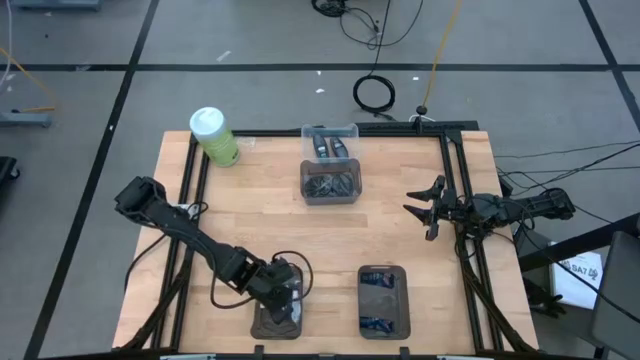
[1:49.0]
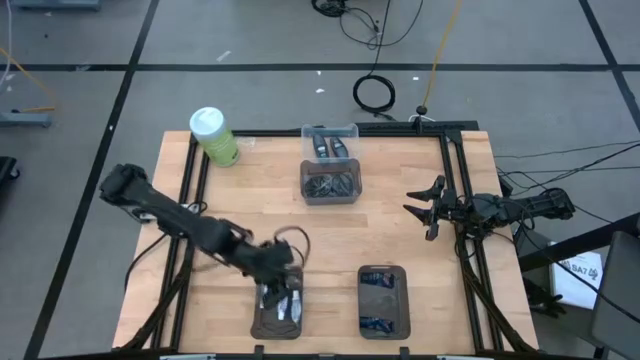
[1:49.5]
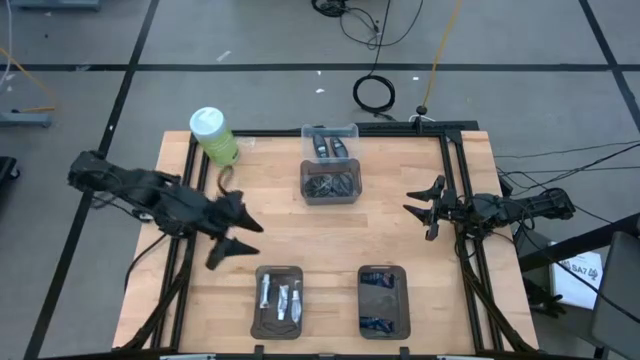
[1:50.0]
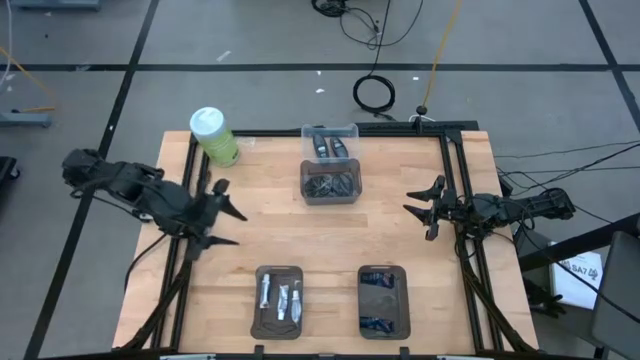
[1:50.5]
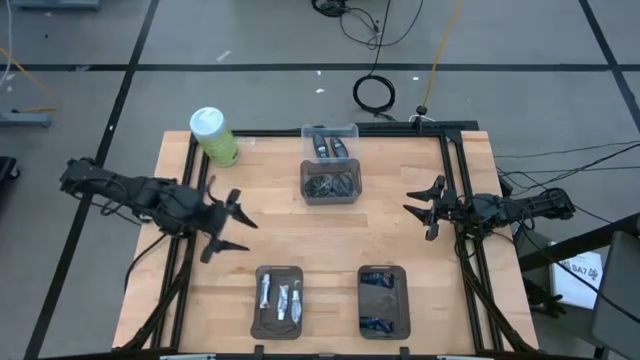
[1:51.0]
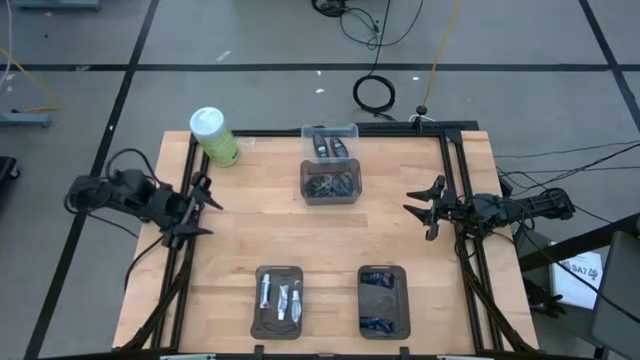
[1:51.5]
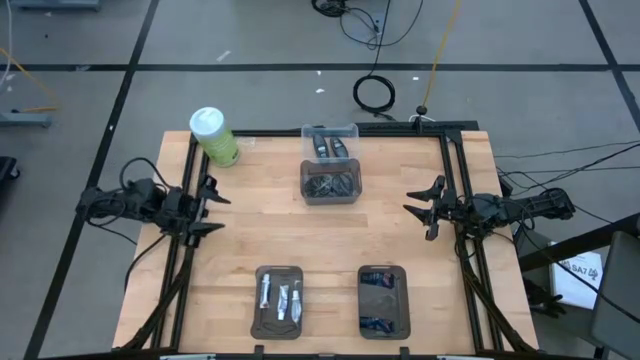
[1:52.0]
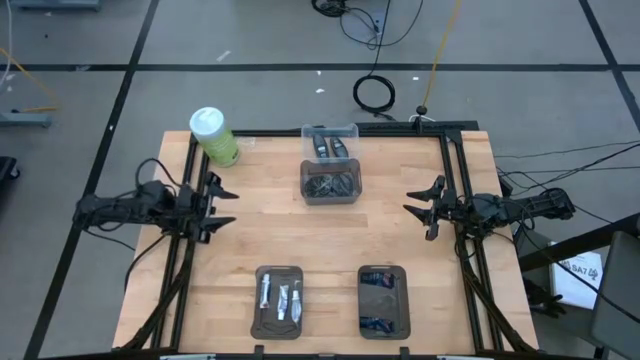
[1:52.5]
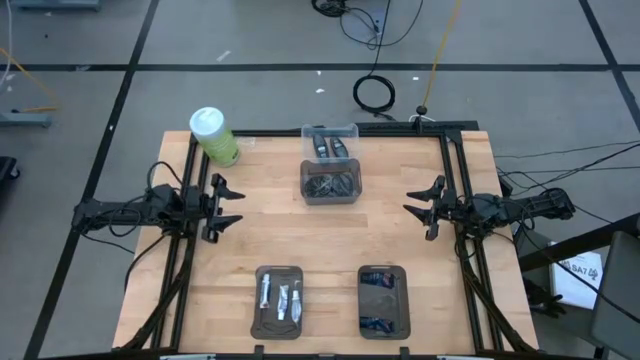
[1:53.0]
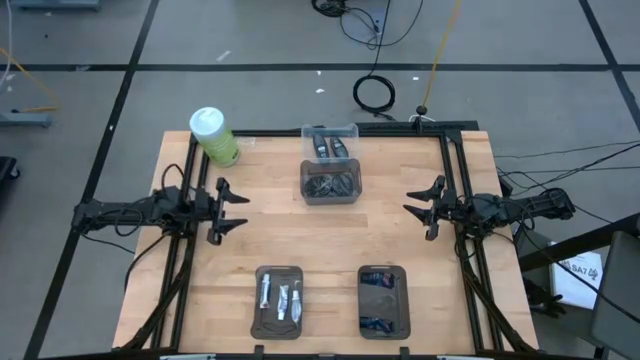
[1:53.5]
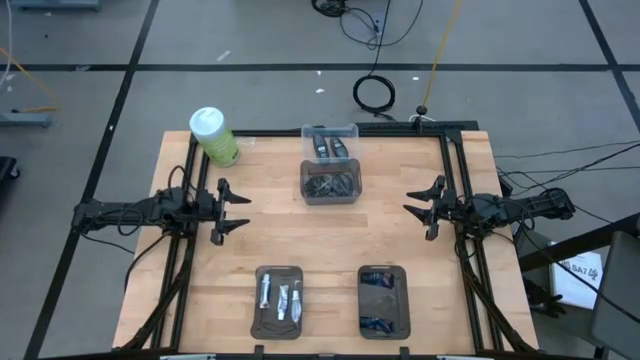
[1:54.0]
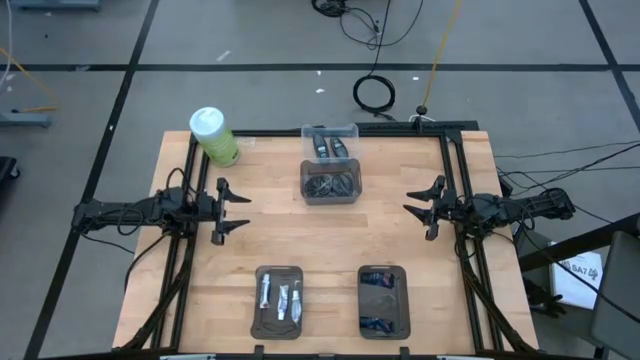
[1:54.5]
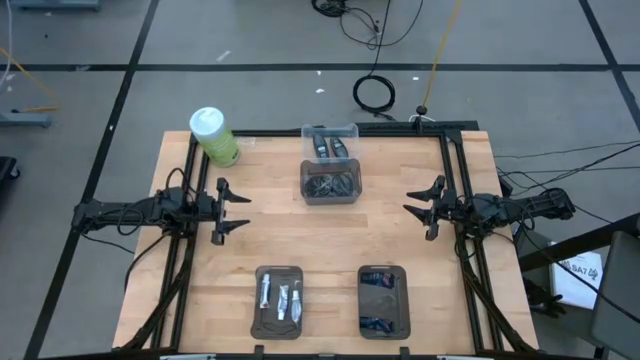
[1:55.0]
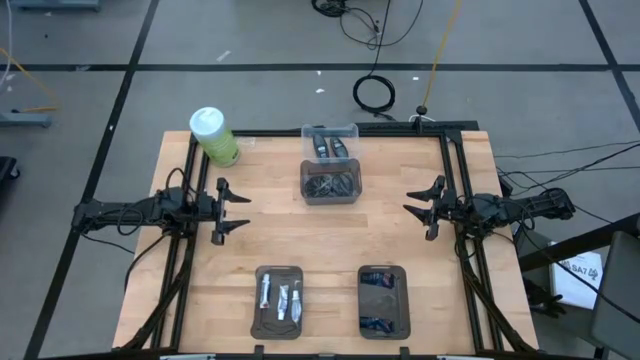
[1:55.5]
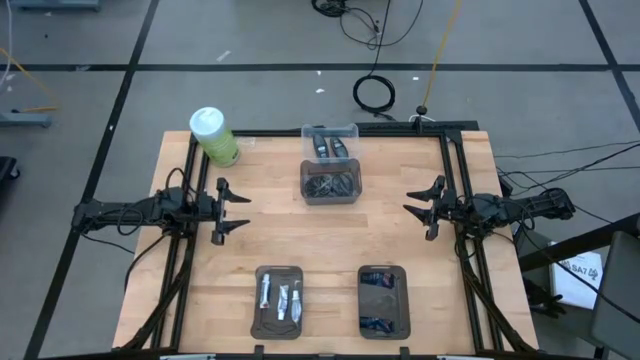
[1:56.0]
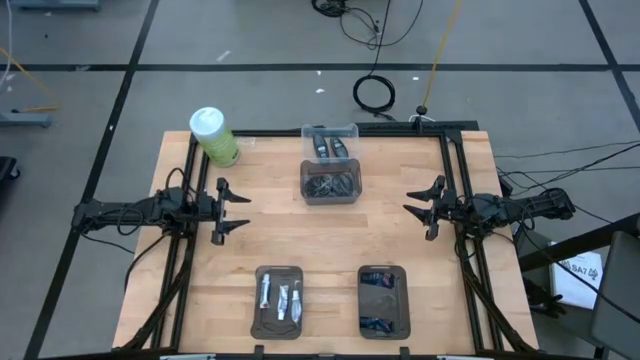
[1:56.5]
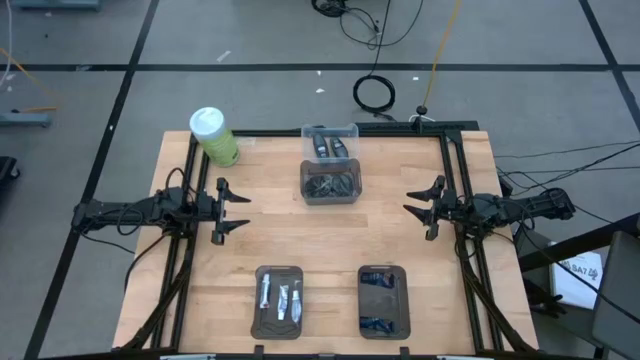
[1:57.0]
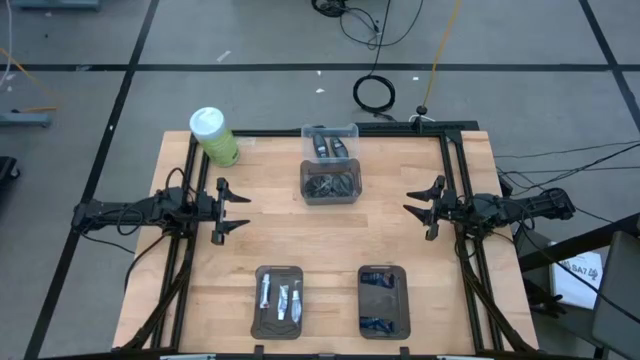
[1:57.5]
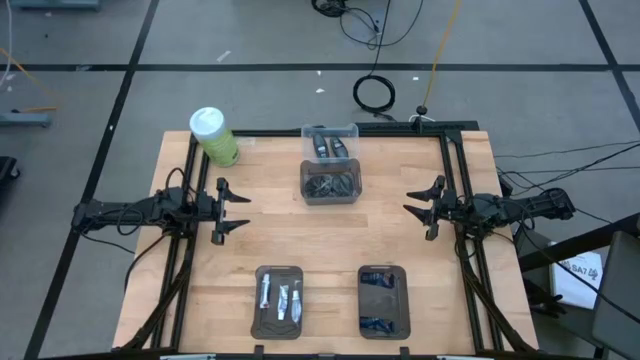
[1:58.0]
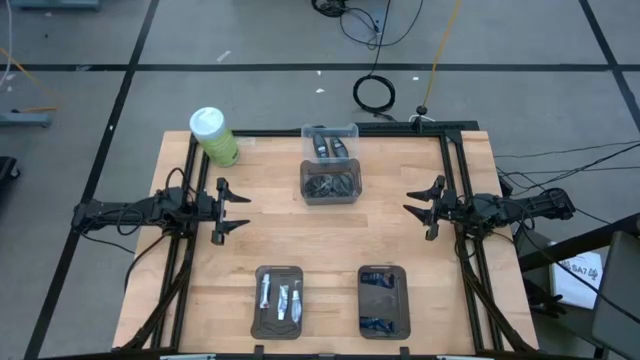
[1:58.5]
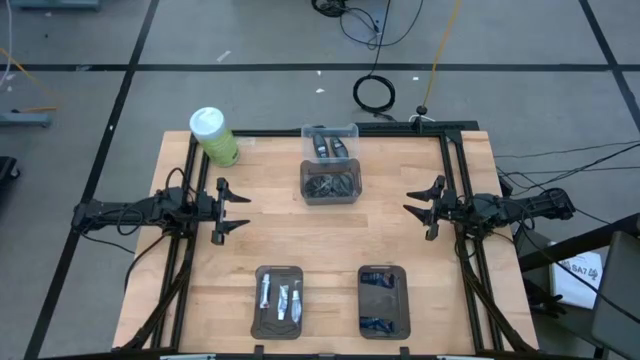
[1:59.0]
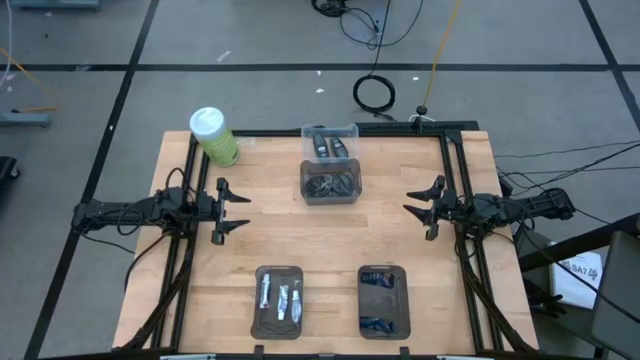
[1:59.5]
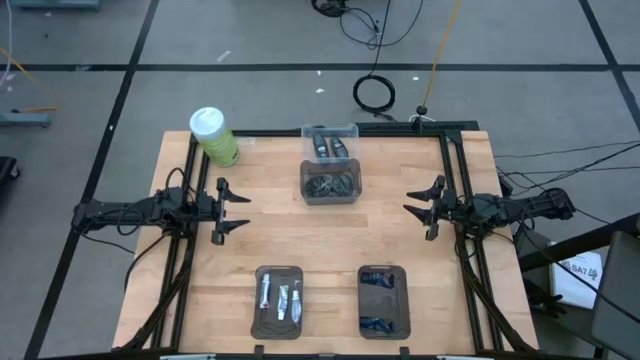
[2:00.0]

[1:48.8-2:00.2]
Task: Pick & Place Travel size toiletries
Return to Home Position

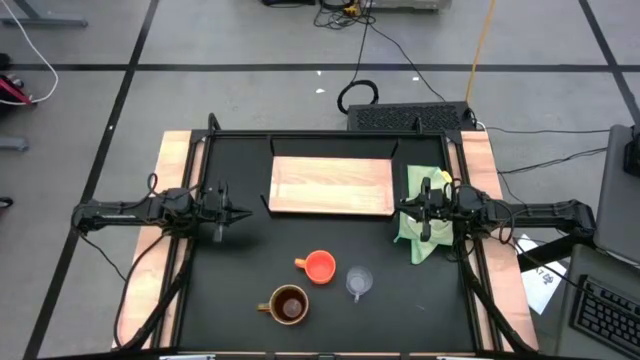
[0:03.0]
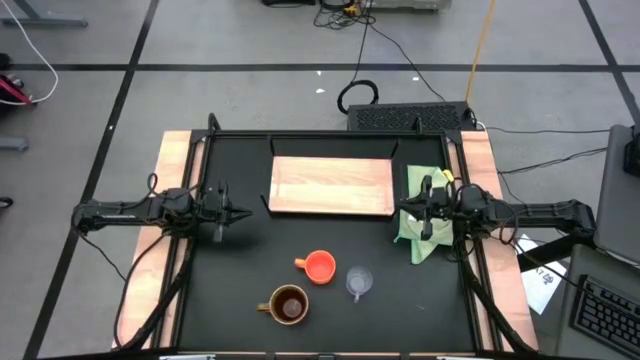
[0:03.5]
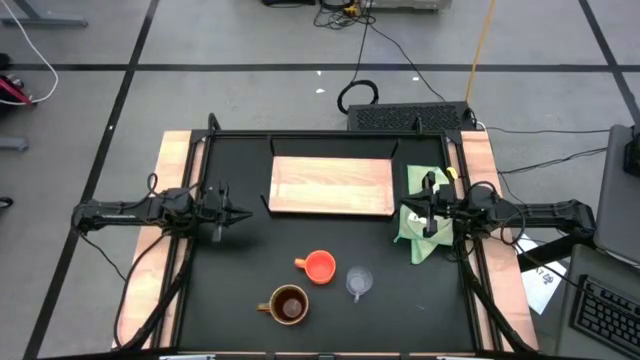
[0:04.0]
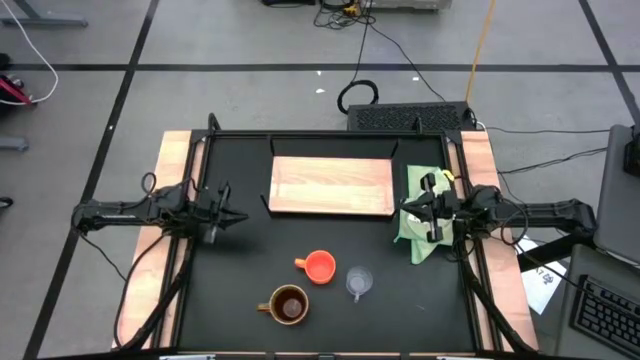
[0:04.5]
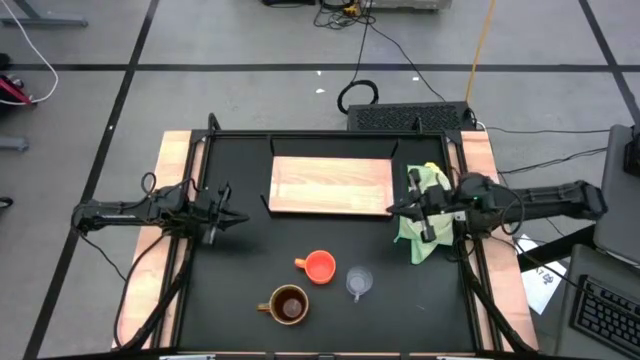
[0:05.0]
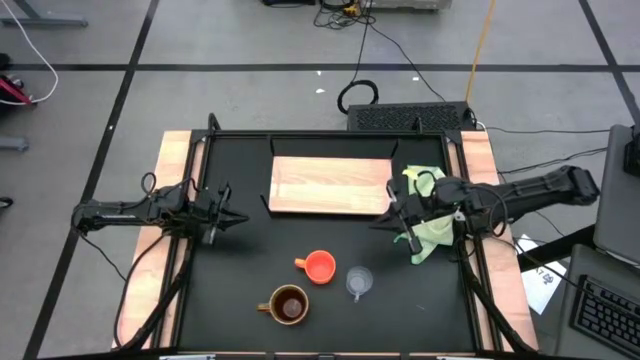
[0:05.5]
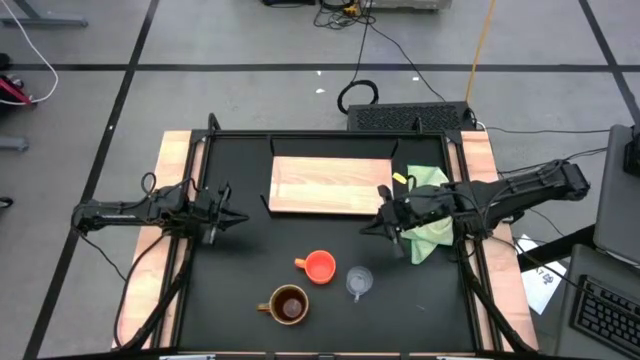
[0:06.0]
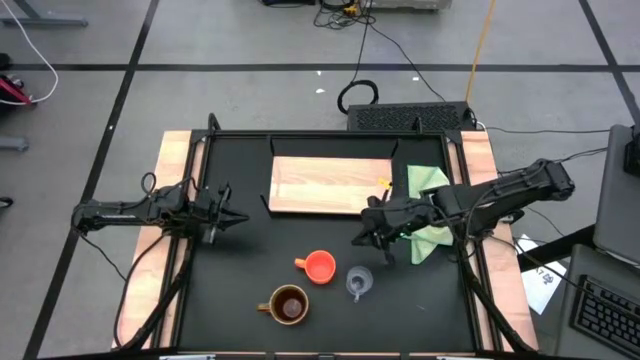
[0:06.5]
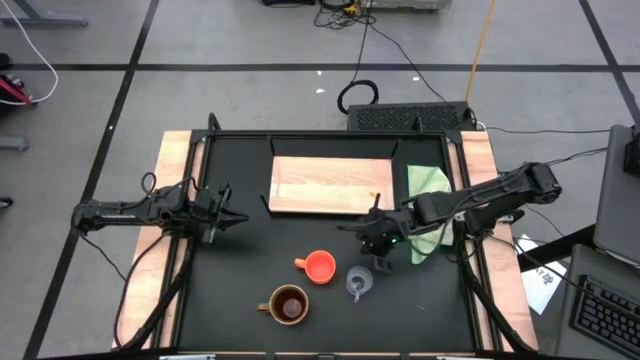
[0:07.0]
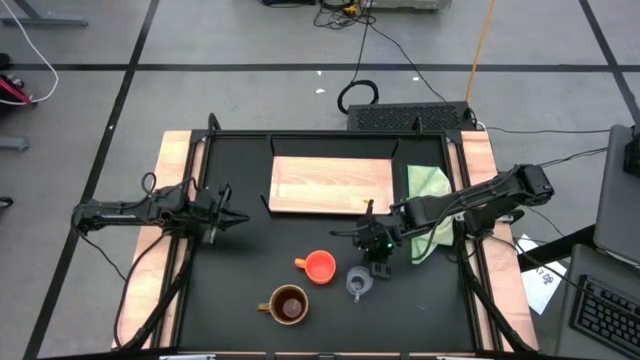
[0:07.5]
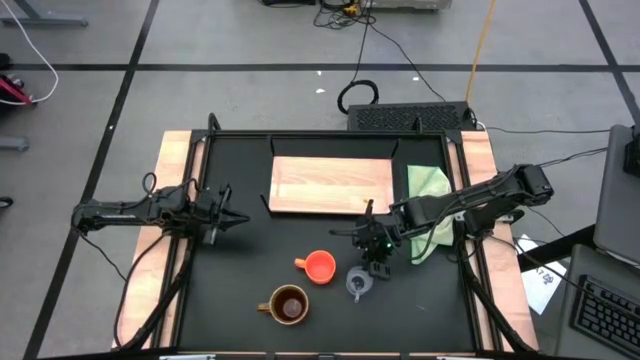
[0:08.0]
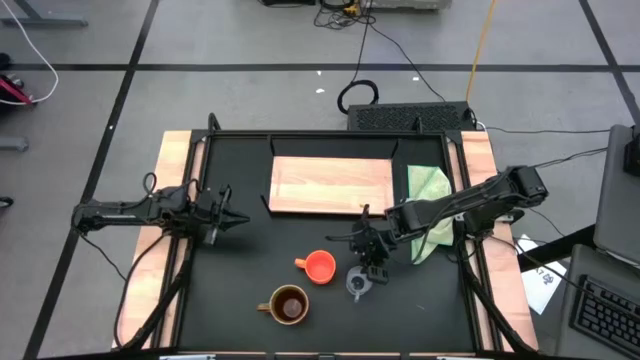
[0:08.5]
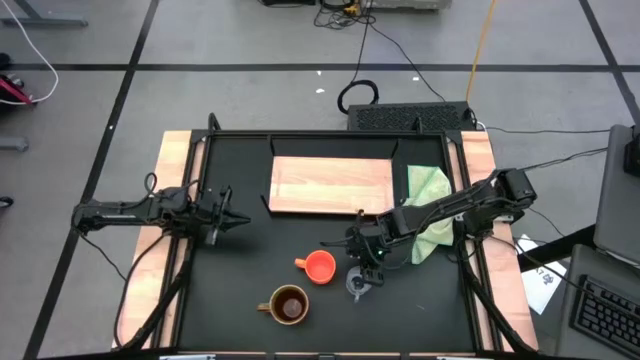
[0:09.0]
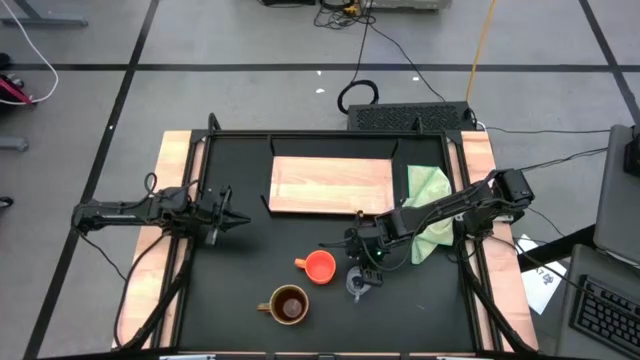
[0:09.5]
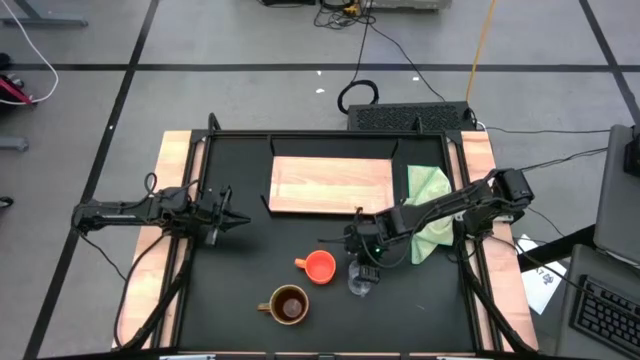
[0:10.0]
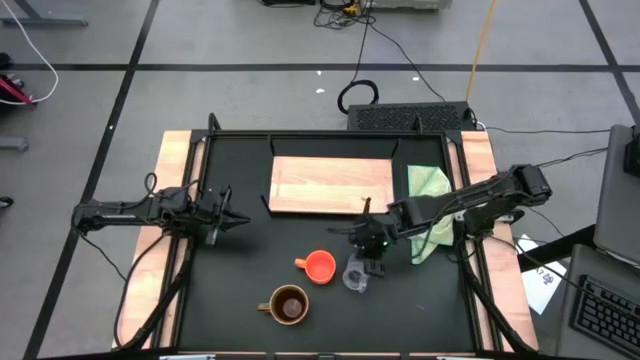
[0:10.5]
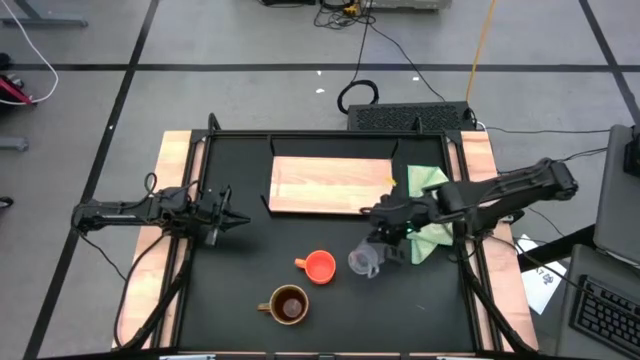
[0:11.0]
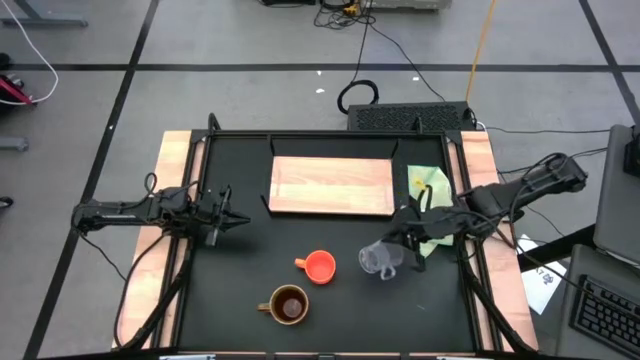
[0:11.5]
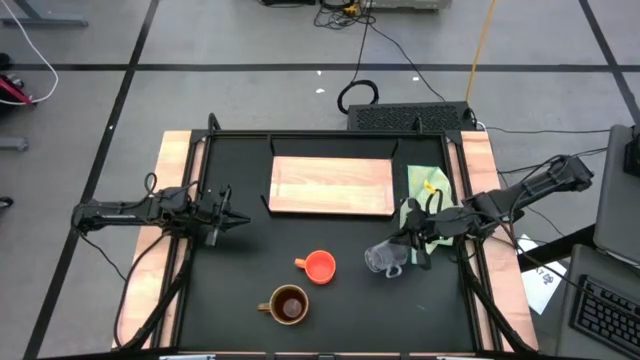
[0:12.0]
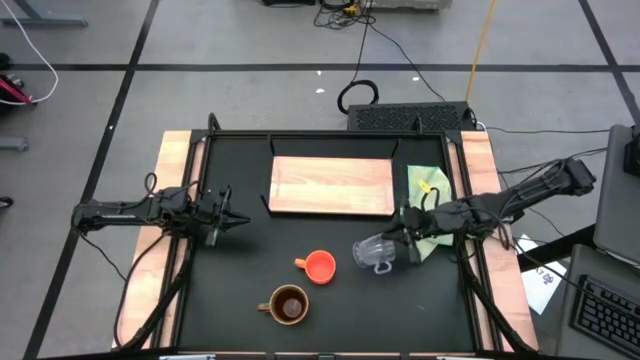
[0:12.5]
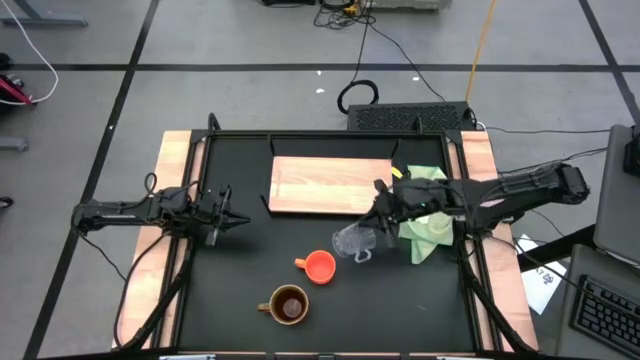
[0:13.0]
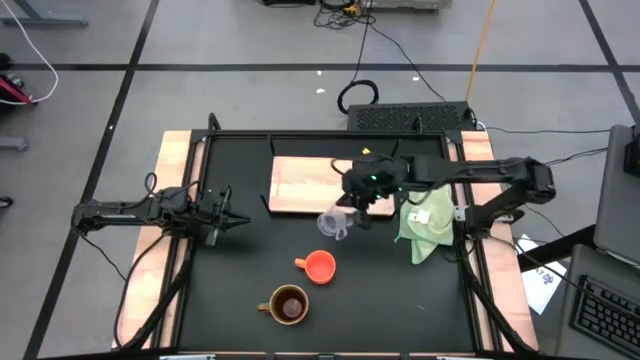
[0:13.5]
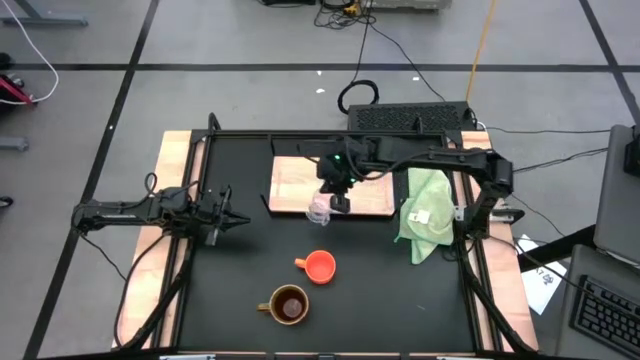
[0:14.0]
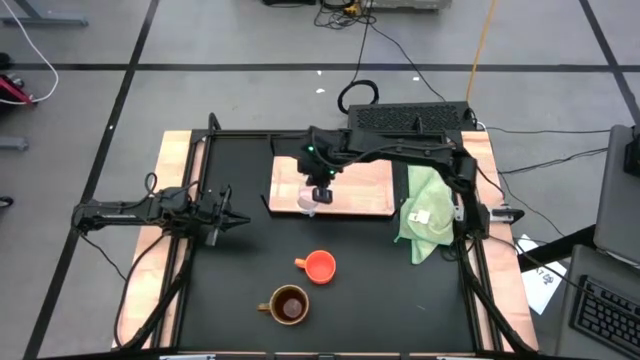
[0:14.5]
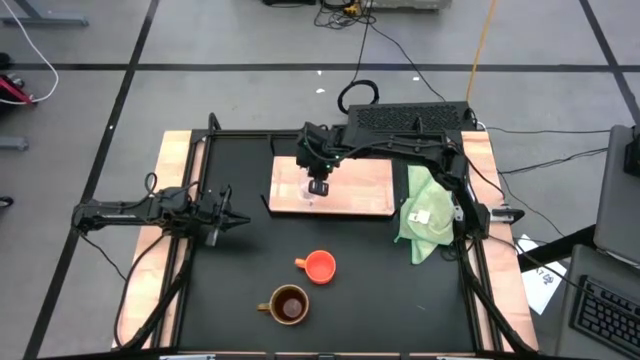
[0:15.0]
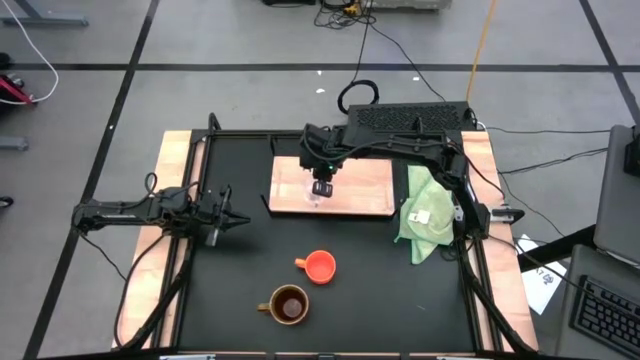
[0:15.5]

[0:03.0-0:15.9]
Task: Stack small to large cups/mugs on shelf
Put the transparent mug on the shelf
